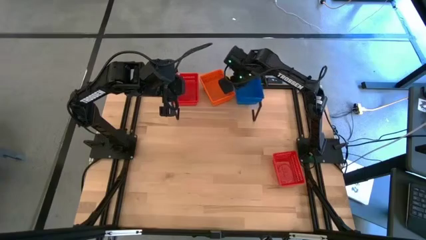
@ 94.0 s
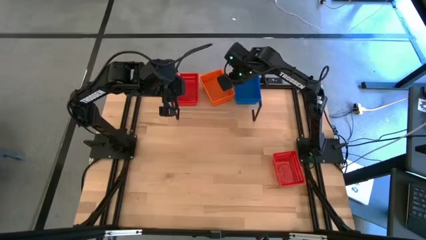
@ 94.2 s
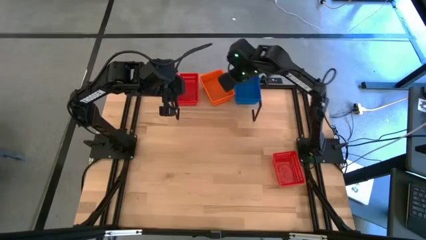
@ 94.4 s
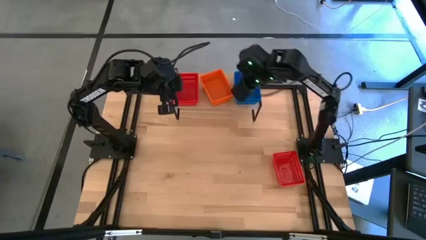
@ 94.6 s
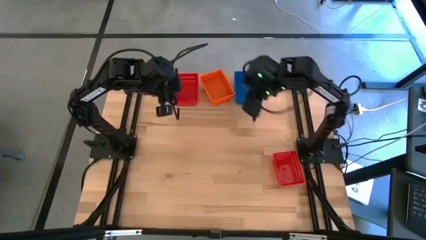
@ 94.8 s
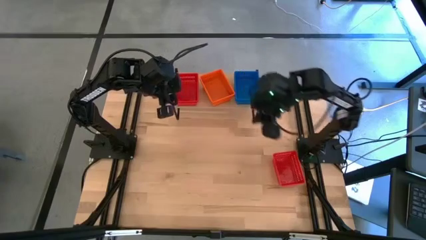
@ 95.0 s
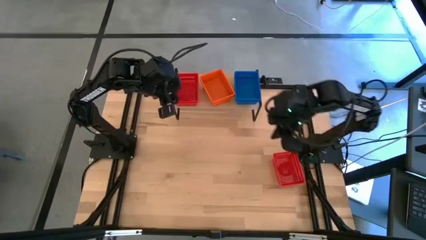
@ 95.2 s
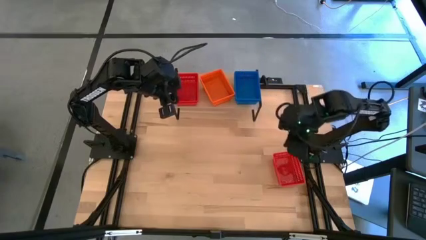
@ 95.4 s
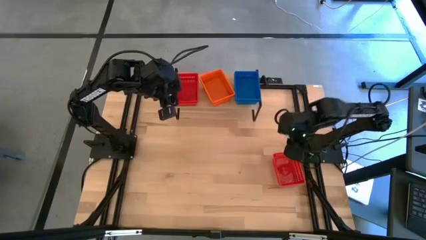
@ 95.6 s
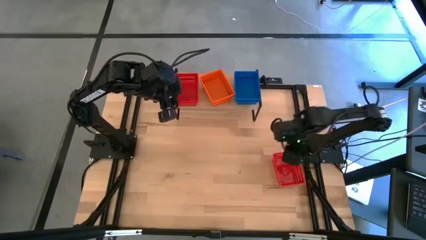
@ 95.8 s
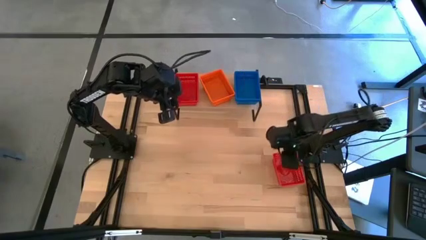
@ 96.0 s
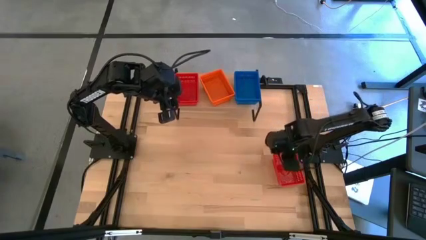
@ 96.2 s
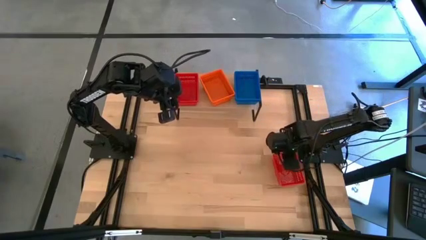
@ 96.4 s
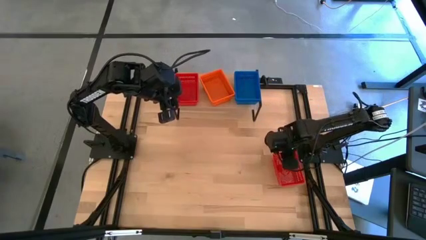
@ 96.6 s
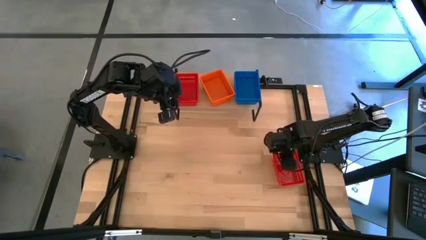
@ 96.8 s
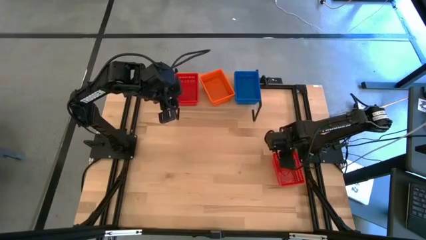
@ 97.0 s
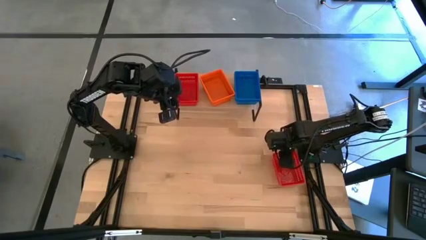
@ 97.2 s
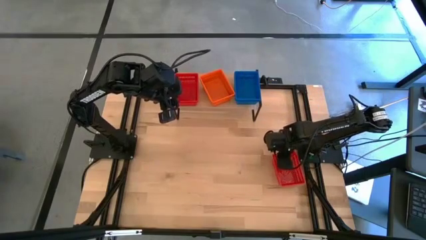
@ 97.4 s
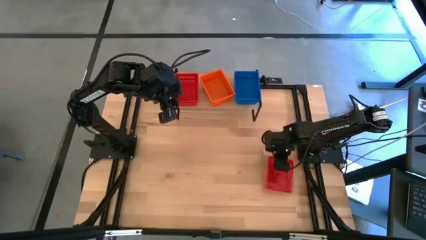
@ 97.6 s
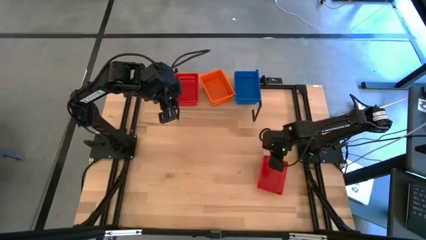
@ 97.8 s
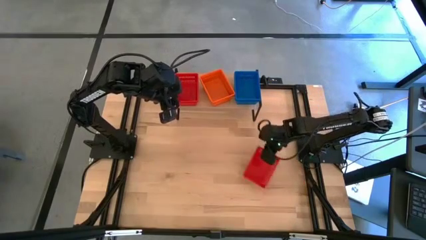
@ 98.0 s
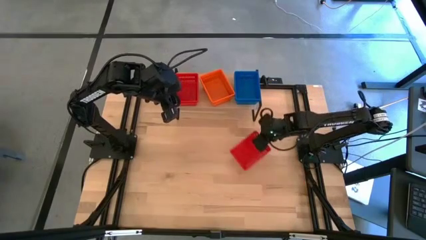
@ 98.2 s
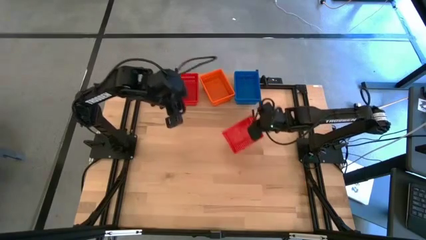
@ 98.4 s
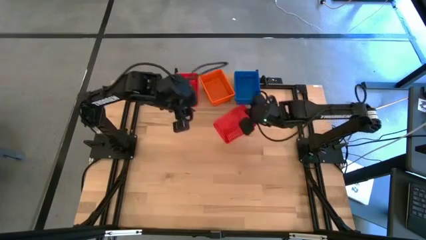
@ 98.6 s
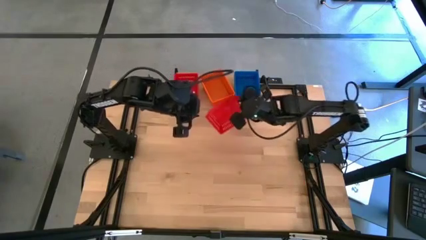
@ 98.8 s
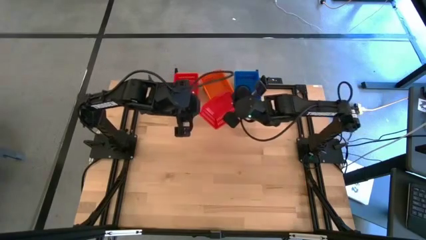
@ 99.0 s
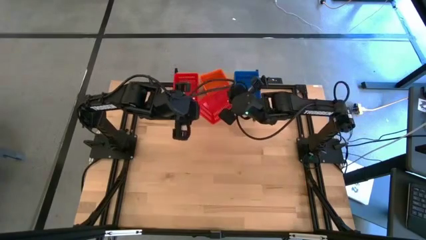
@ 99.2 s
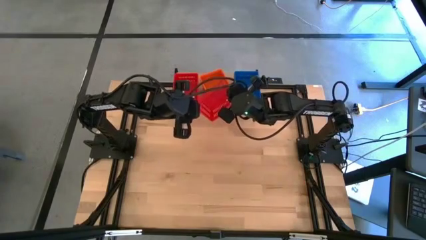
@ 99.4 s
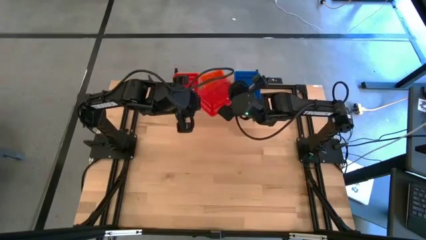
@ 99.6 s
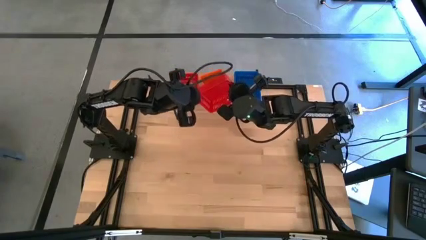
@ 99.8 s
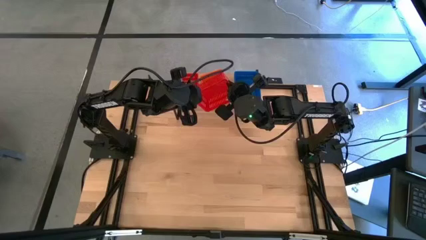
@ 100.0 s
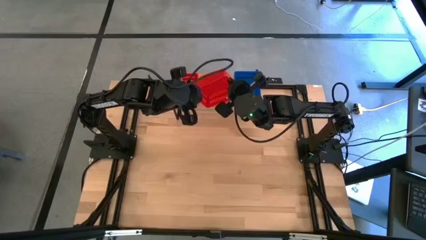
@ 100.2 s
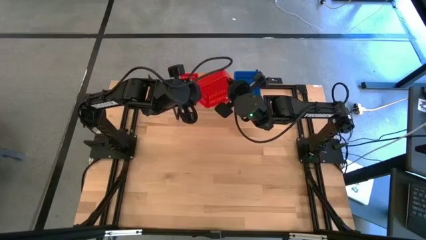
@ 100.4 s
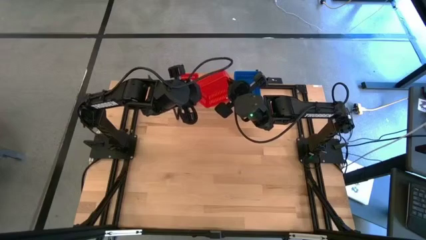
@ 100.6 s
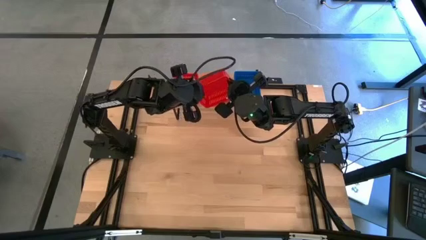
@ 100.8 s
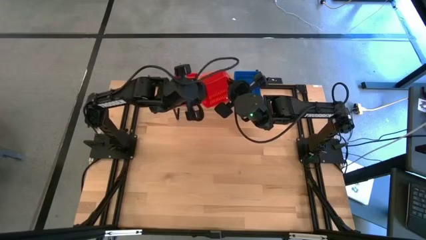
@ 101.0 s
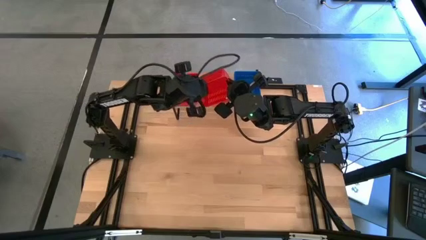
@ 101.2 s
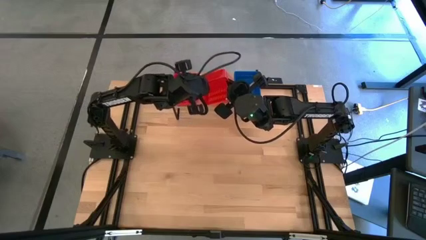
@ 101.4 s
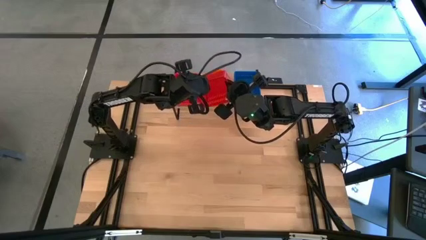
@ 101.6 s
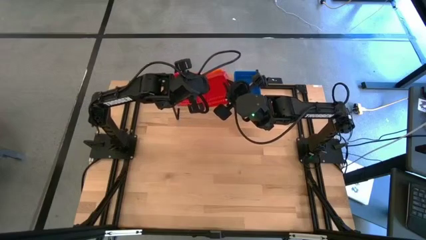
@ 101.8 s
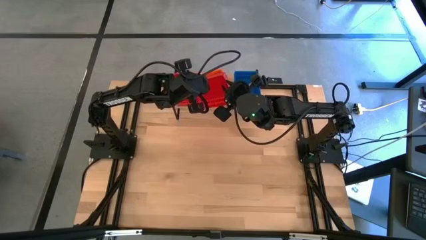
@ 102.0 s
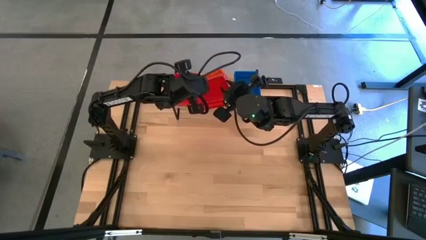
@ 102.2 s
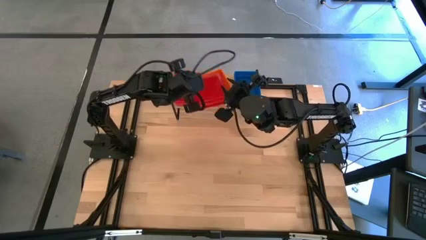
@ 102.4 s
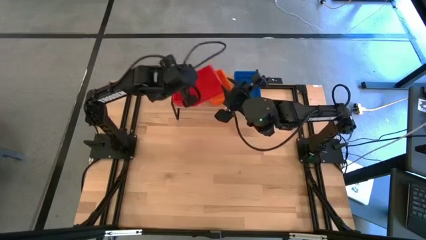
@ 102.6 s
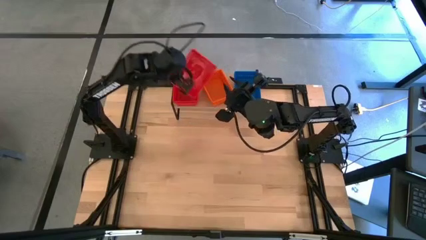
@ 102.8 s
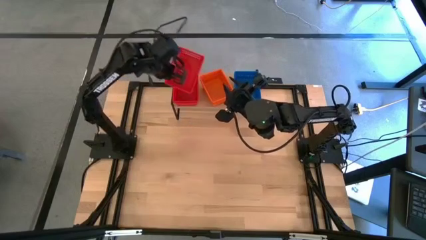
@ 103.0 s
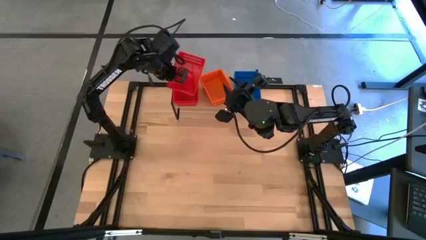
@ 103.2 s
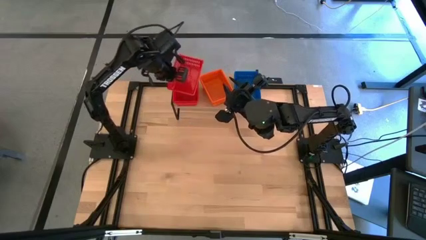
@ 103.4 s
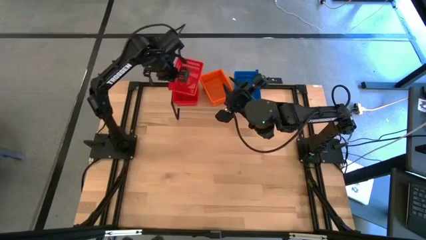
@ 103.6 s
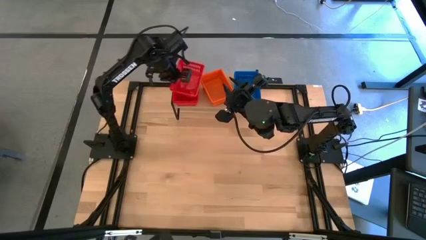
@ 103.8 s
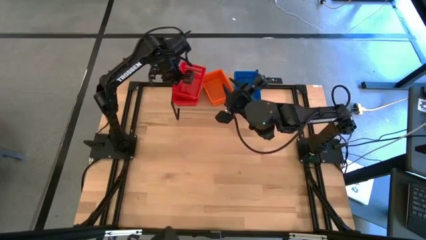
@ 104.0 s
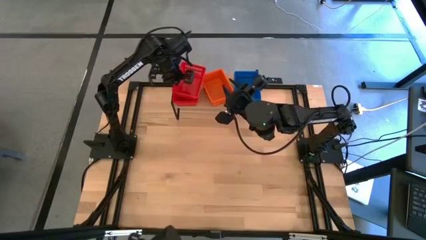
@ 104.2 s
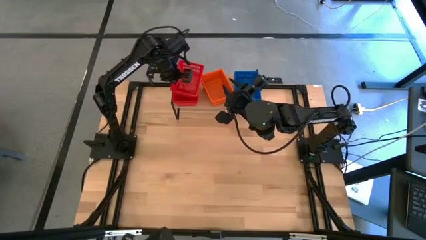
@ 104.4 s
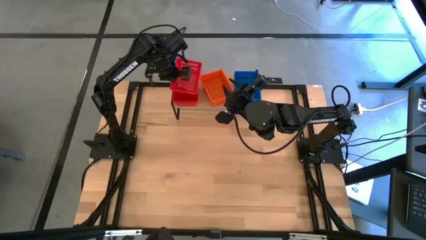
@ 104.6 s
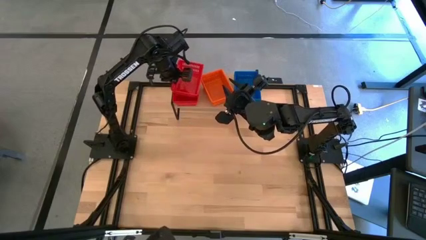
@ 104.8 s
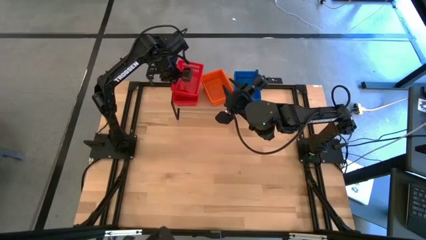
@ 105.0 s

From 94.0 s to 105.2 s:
Task: Stack baskets on shelf by color
Stack the red basket into the red basket on the shelf
